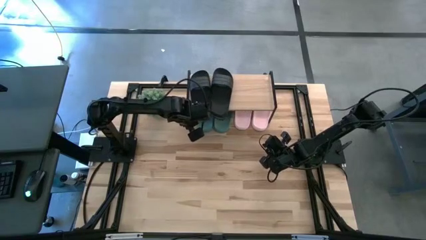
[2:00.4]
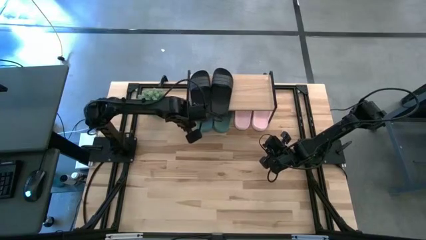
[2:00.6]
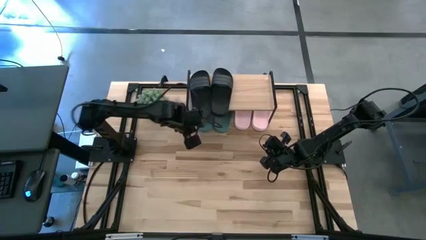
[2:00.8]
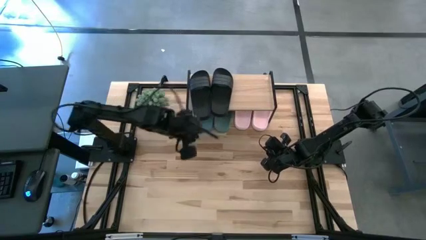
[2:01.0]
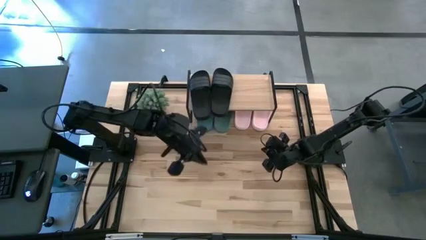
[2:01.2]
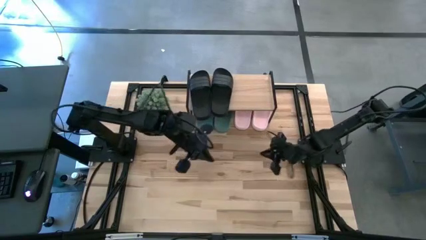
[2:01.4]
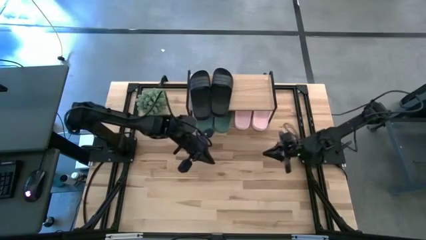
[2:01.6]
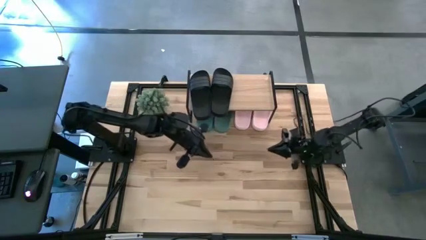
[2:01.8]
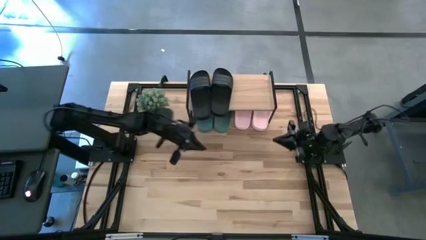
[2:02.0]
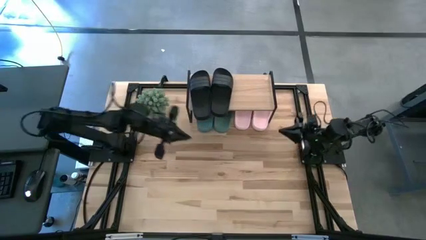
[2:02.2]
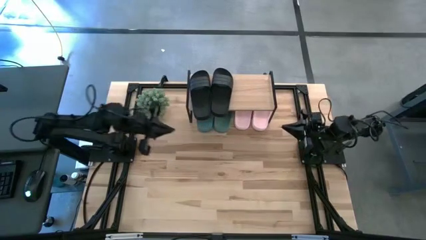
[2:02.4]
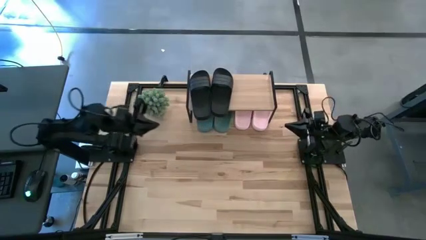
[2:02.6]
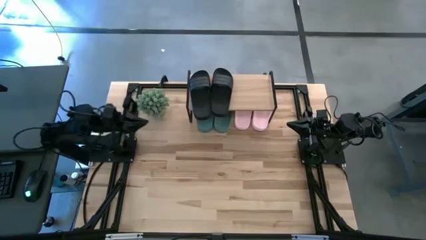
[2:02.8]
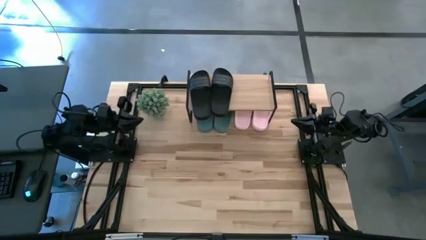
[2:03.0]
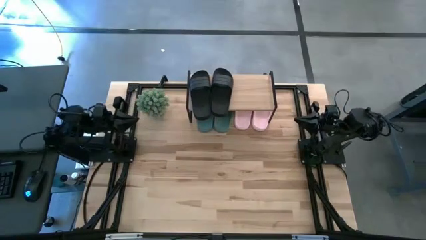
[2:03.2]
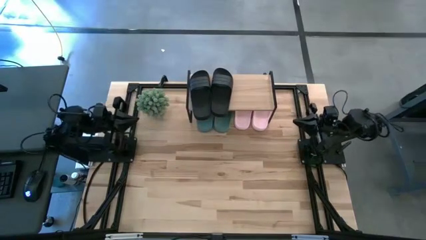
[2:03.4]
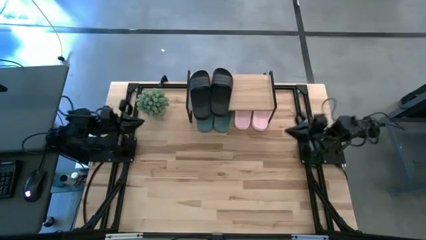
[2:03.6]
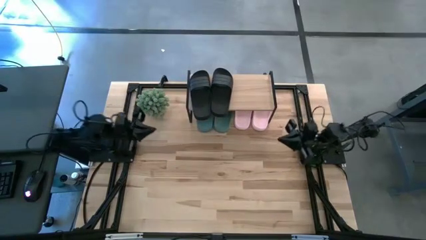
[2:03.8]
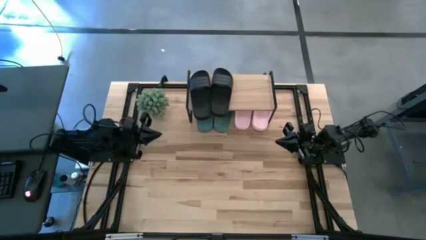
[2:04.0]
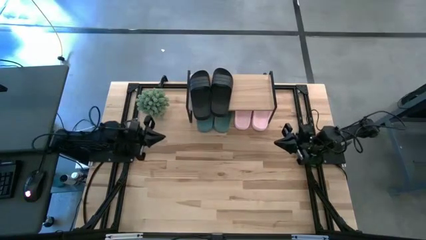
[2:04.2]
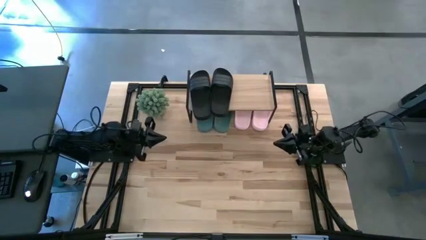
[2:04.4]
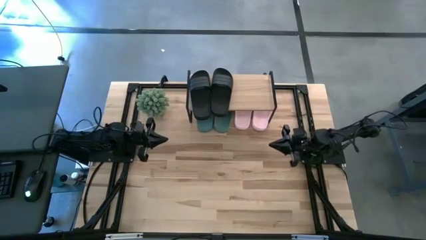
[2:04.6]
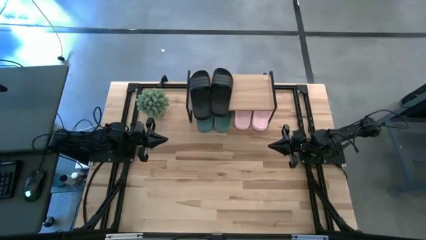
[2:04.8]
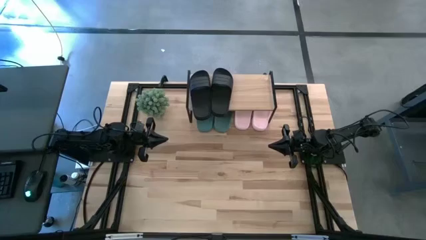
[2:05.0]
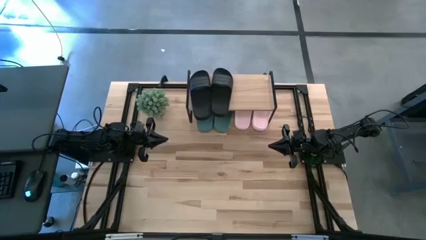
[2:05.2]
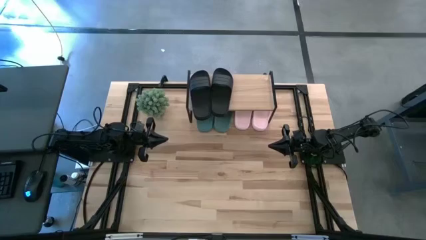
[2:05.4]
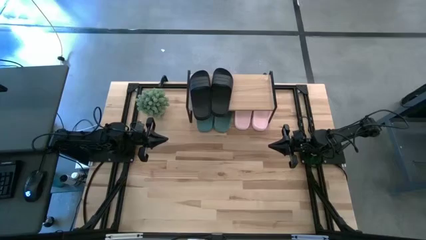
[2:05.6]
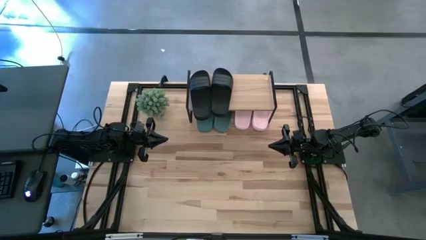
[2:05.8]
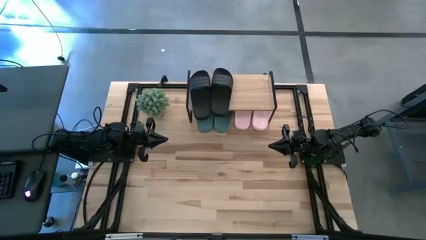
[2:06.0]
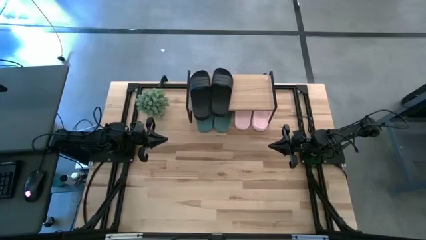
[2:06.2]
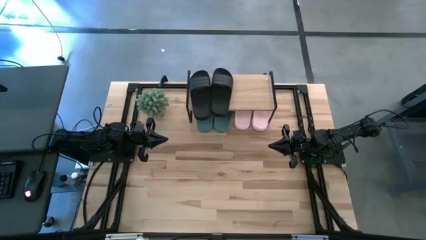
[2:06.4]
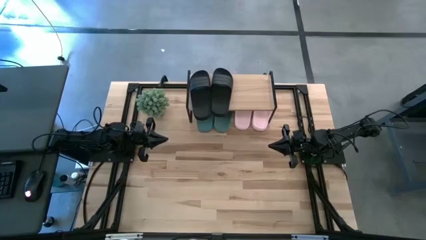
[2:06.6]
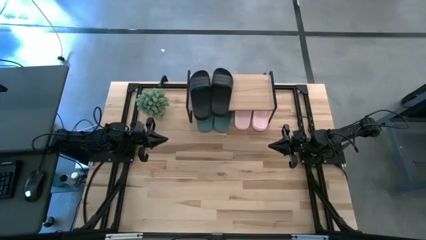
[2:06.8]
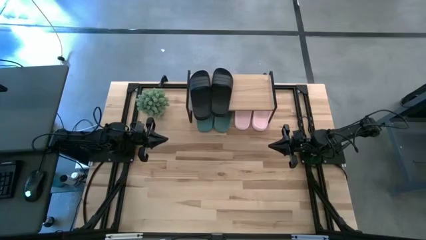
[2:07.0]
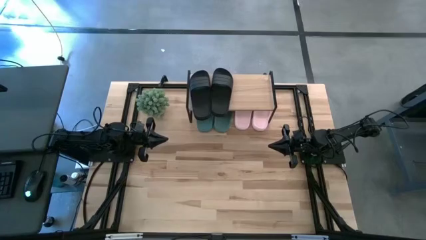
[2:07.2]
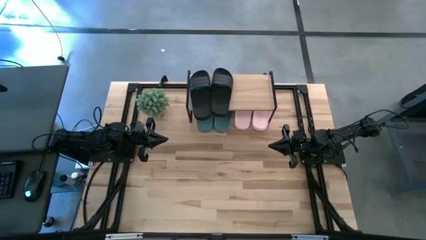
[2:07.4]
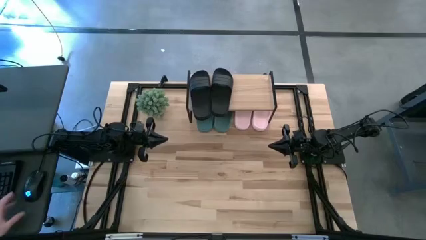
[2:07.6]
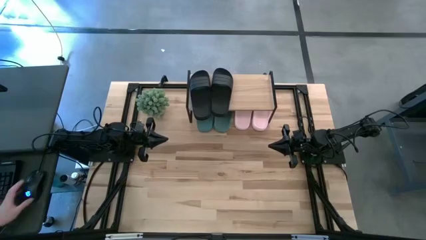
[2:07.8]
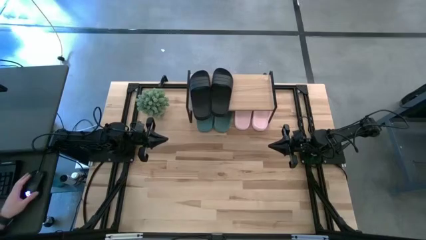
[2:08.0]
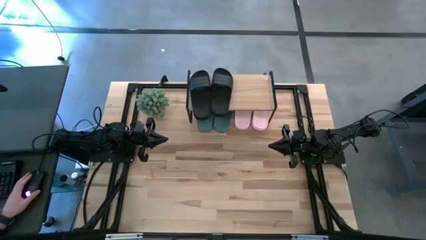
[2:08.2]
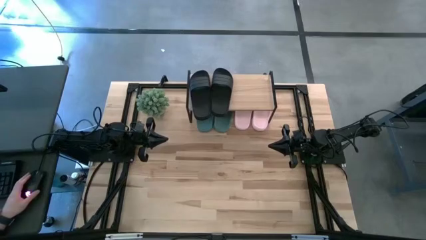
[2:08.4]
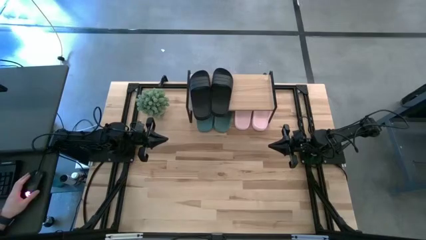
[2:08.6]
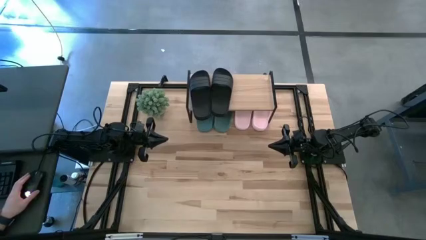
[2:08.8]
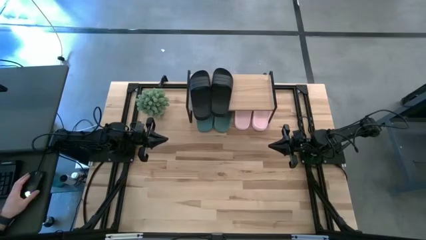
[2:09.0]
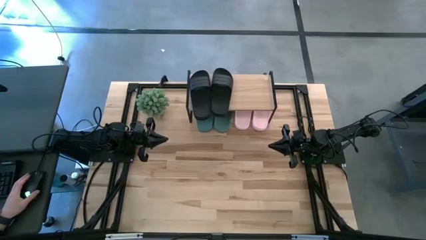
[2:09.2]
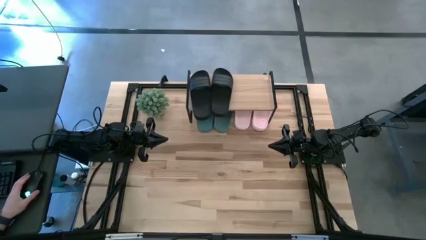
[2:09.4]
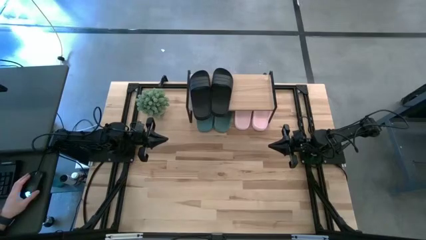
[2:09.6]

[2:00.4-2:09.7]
Task: Pick and place slides into the shelf
Return to Home Position

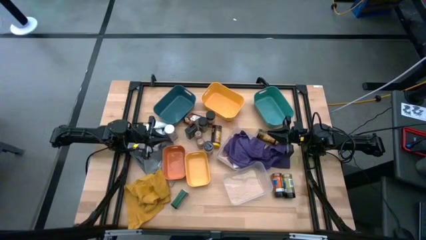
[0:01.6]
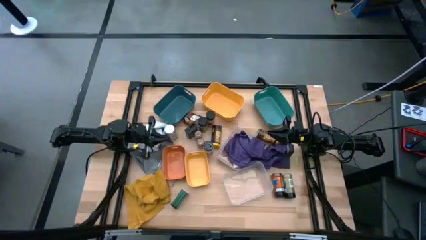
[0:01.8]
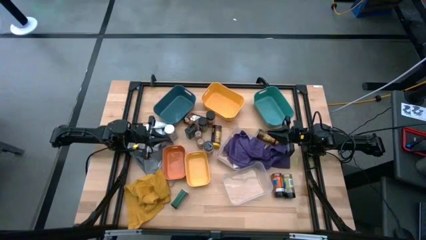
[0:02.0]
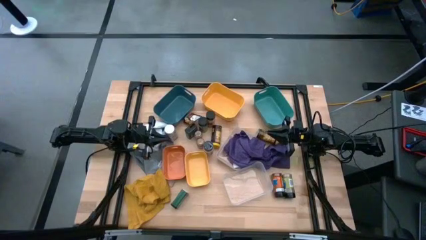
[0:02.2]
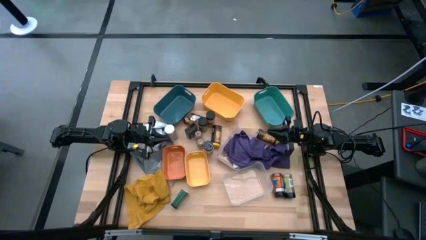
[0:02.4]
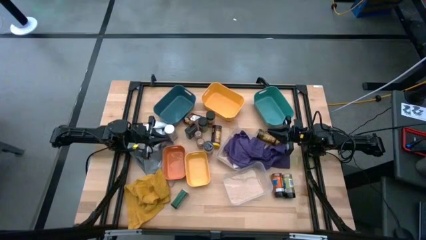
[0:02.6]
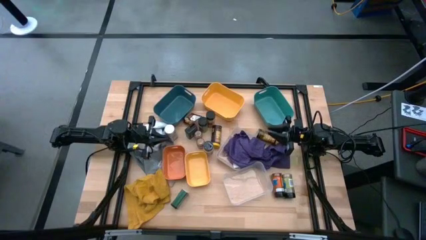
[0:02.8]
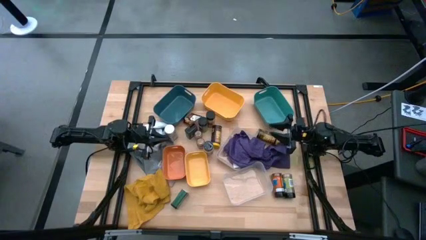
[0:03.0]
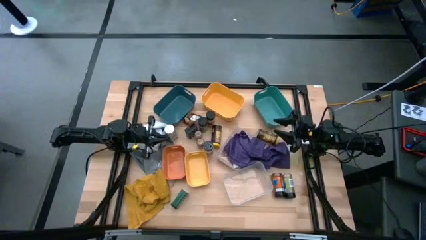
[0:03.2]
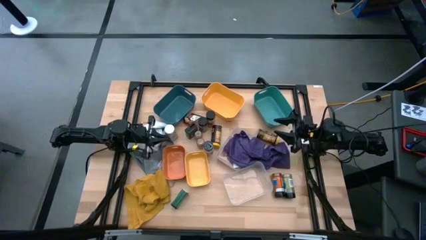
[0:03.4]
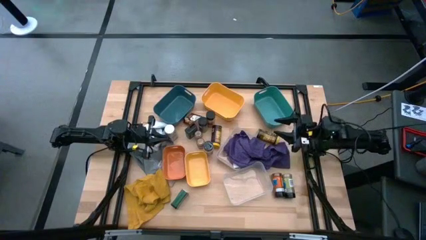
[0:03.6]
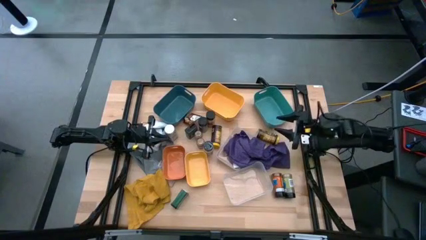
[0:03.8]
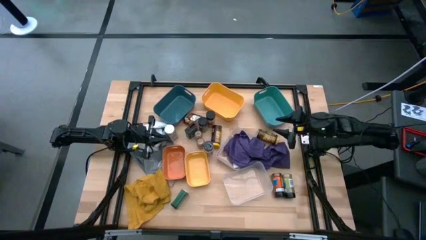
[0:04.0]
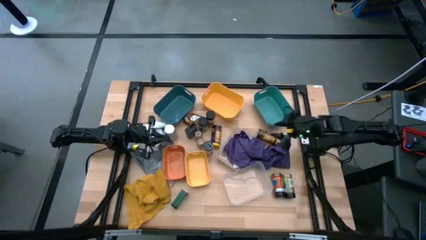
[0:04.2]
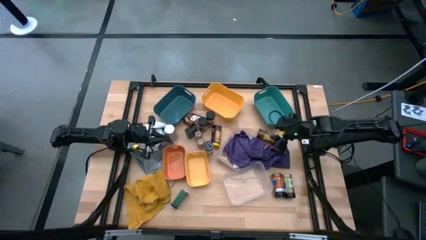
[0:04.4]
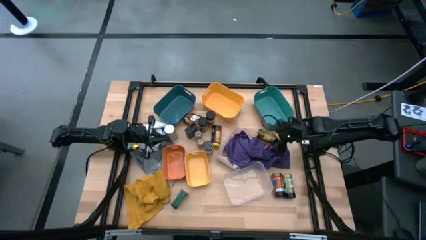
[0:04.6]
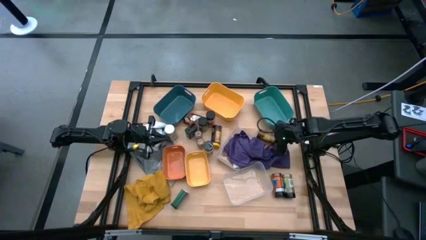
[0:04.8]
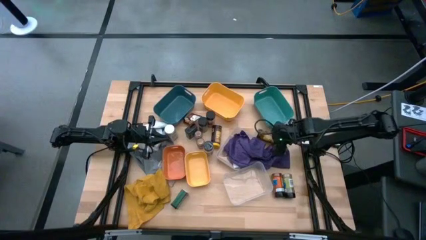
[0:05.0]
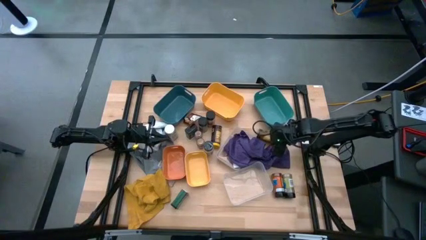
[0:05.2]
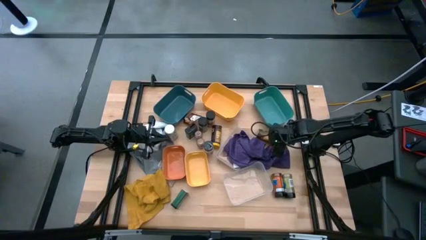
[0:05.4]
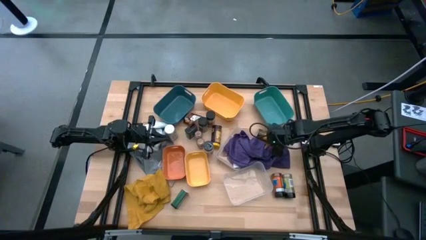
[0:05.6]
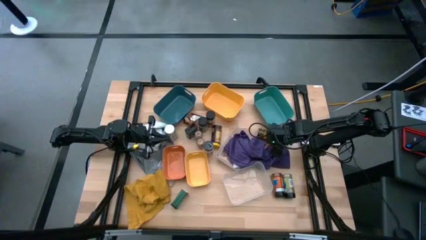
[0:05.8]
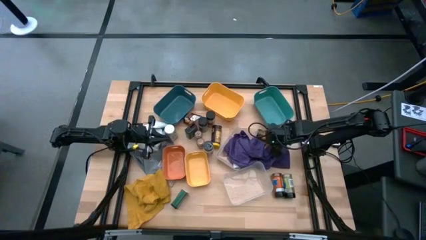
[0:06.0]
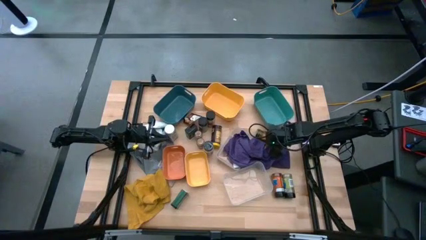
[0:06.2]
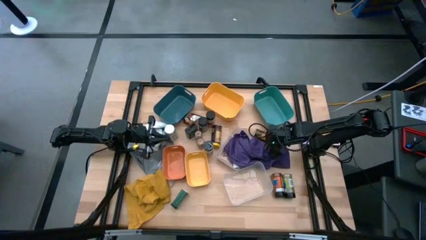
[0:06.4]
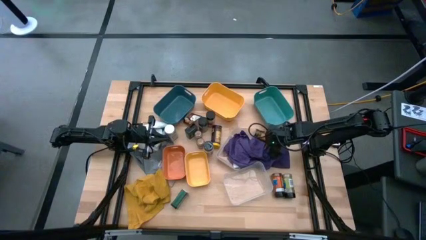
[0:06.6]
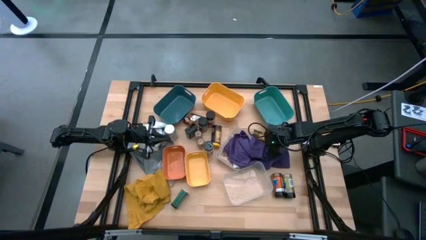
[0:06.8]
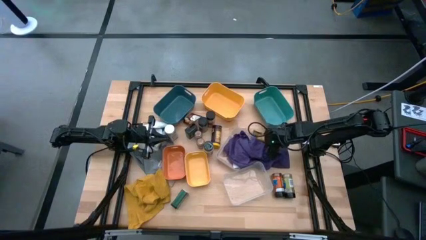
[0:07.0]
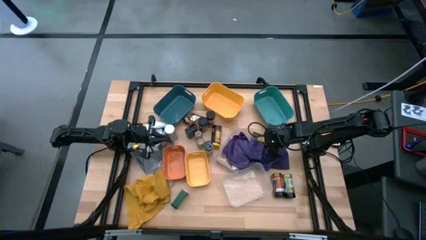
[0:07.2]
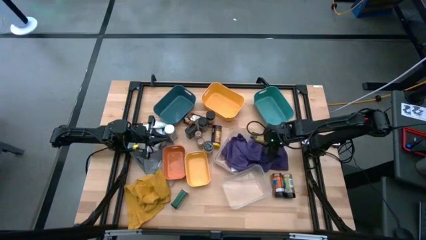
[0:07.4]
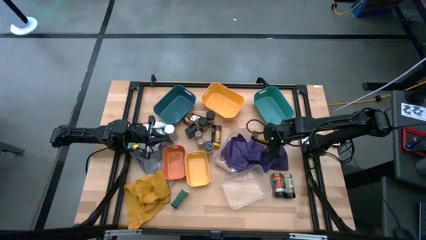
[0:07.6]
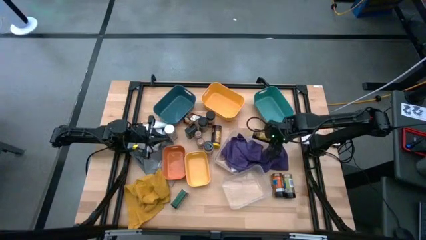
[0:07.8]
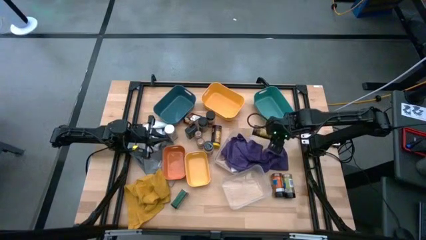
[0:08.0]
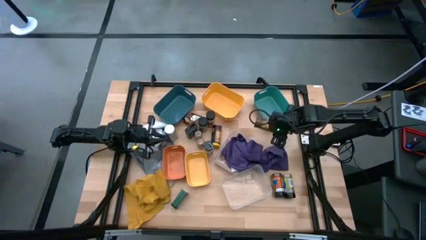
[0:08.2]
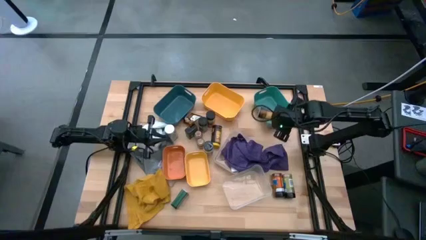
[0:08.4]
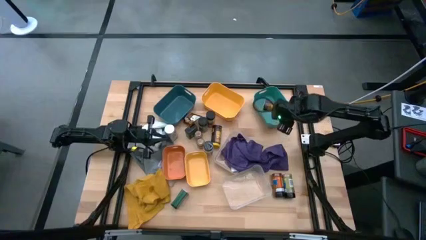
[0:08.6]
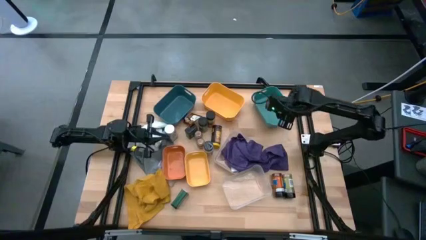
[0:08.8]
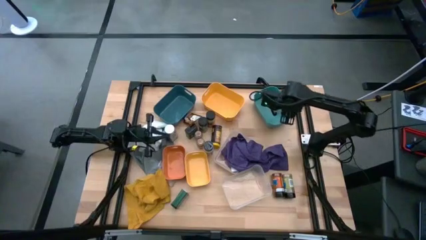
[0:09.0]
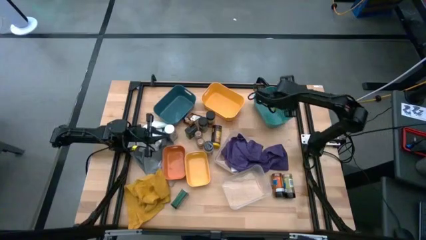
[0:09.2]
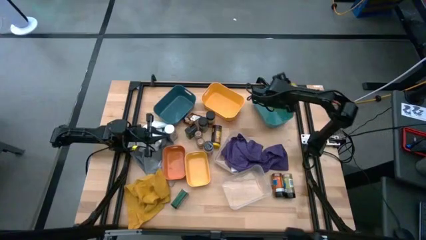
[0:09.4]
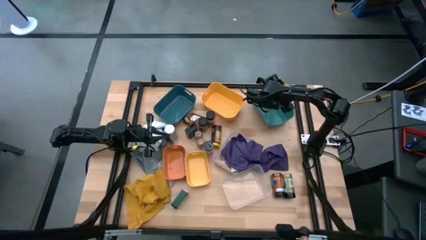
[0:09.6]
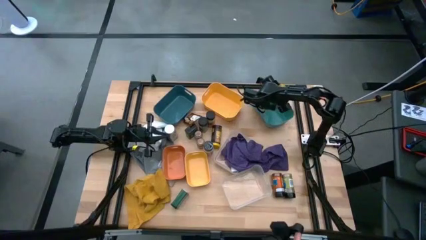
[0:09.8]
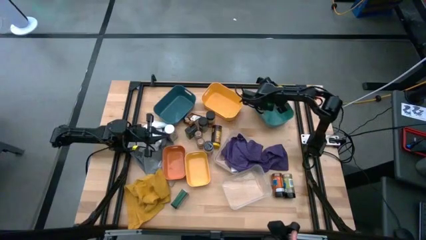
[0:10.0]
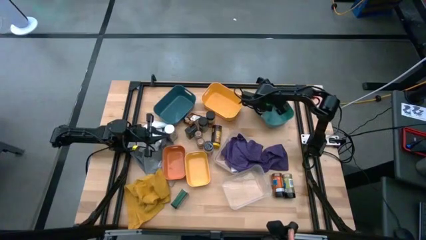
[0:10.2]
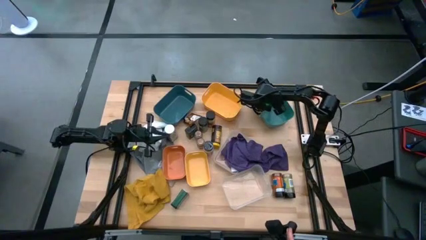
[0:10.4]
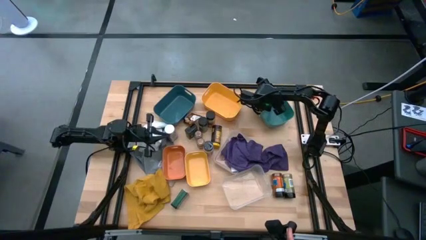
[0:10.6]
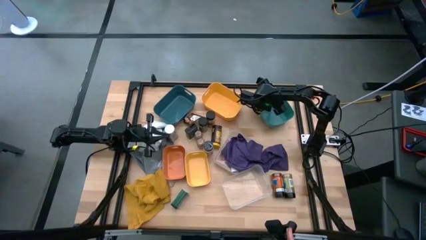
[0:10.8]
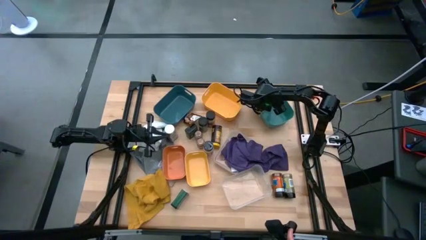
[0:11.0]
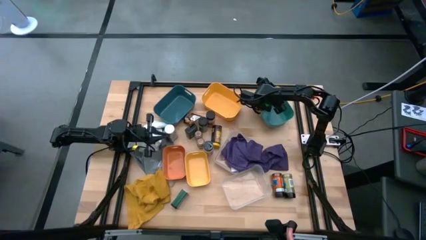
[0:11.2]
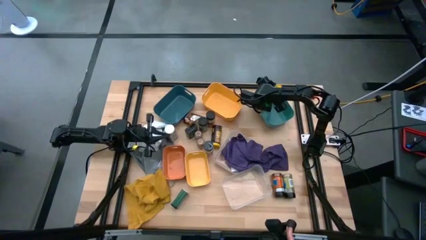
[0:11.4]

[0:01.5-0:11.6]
Task: Sort spices by type
Put the yellow spice bottle into the blue bin
